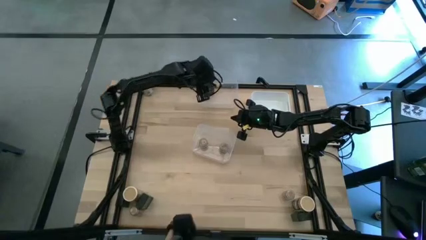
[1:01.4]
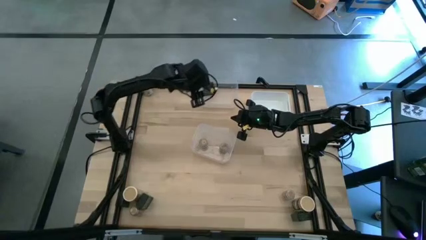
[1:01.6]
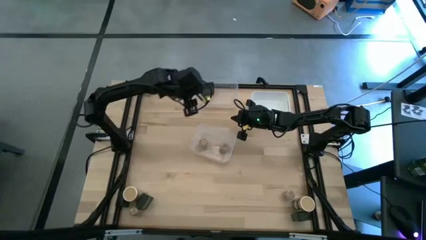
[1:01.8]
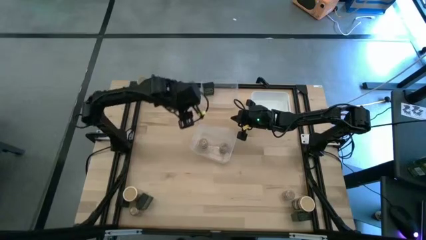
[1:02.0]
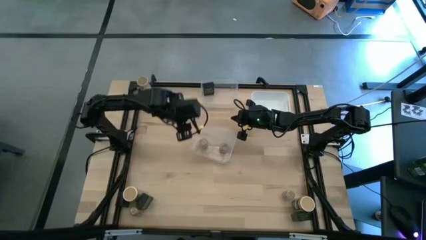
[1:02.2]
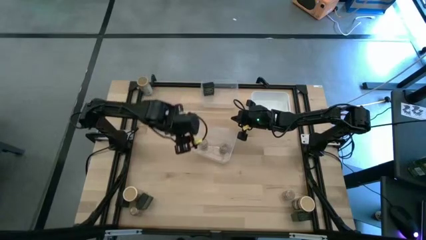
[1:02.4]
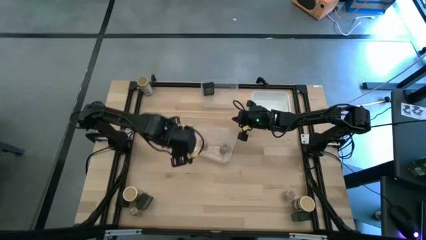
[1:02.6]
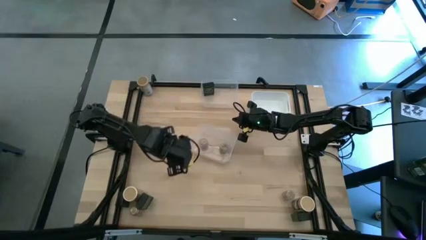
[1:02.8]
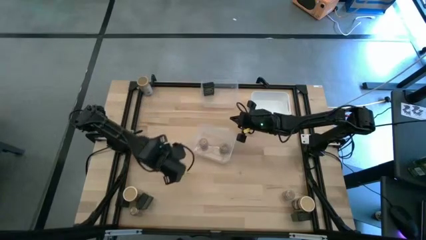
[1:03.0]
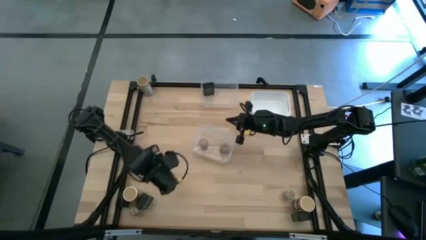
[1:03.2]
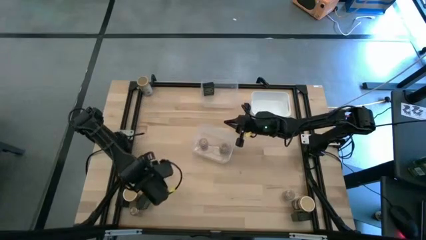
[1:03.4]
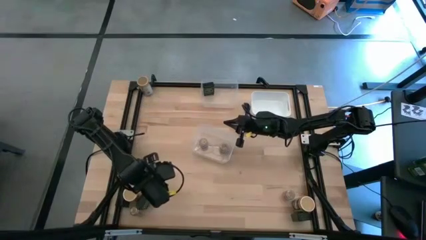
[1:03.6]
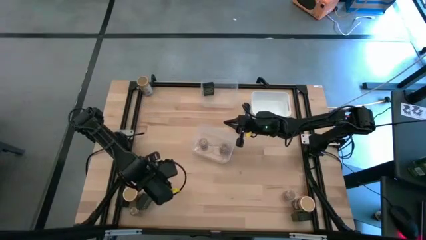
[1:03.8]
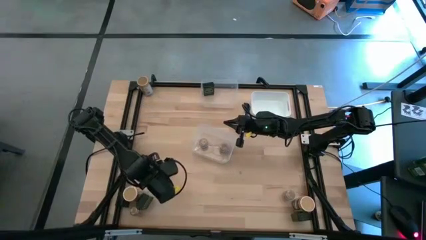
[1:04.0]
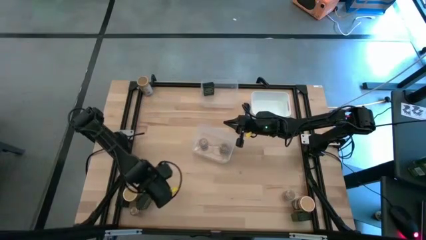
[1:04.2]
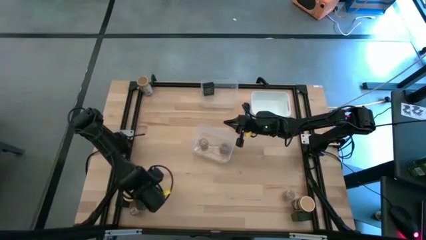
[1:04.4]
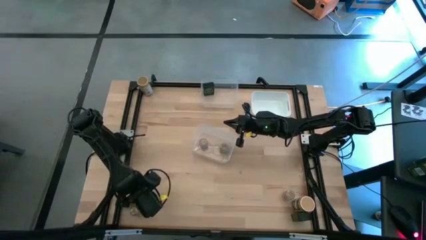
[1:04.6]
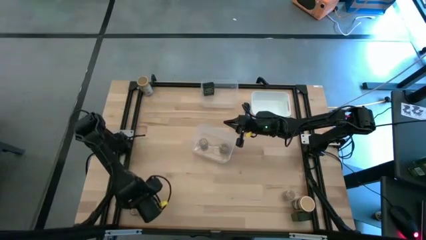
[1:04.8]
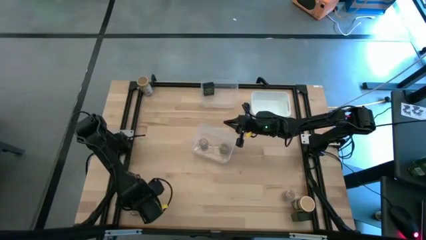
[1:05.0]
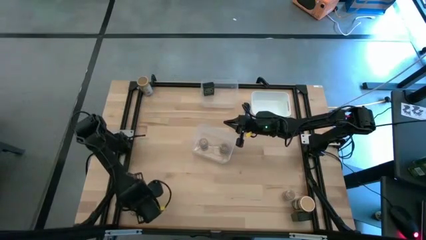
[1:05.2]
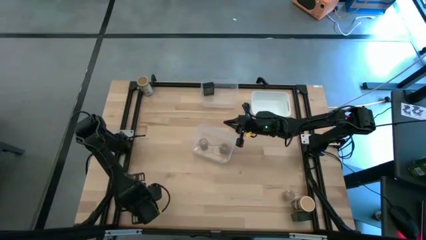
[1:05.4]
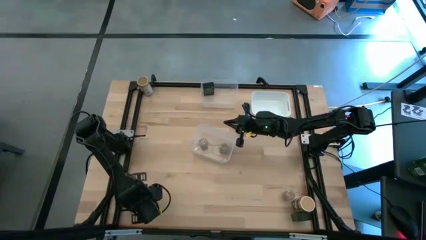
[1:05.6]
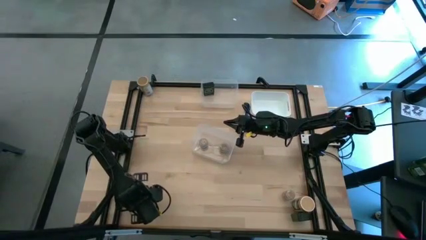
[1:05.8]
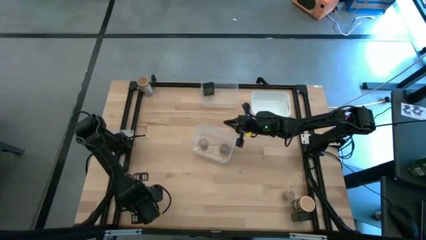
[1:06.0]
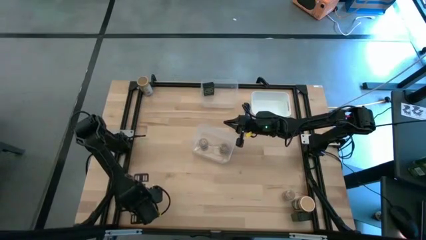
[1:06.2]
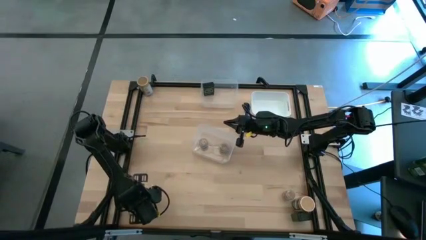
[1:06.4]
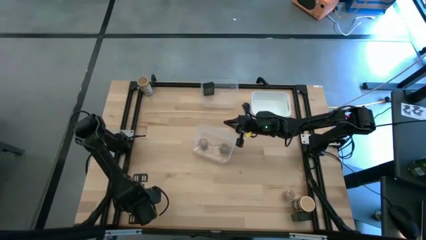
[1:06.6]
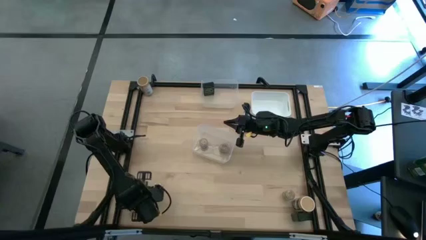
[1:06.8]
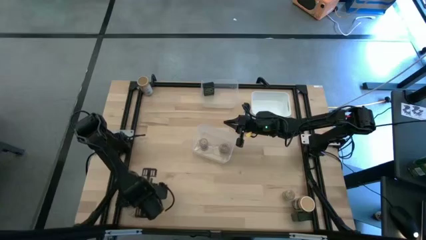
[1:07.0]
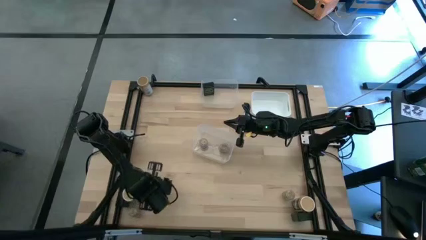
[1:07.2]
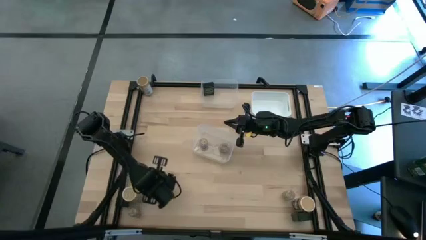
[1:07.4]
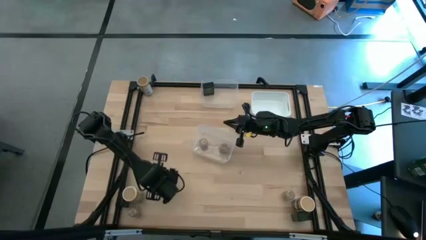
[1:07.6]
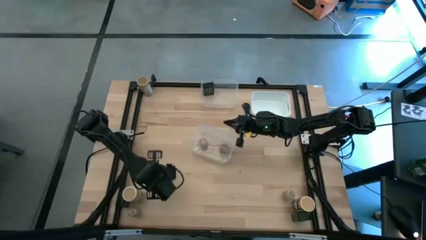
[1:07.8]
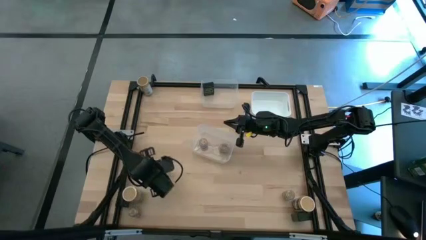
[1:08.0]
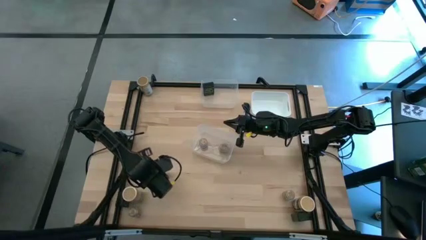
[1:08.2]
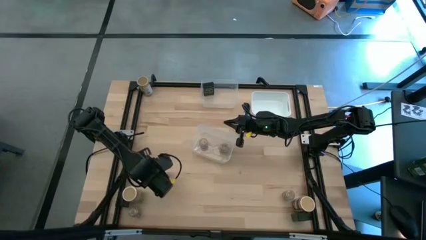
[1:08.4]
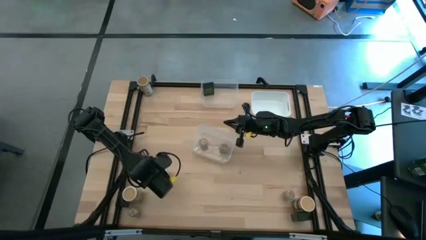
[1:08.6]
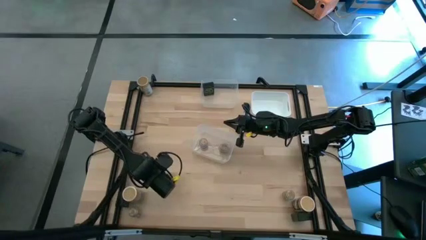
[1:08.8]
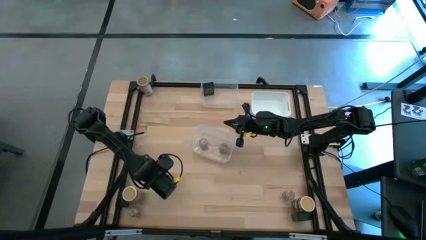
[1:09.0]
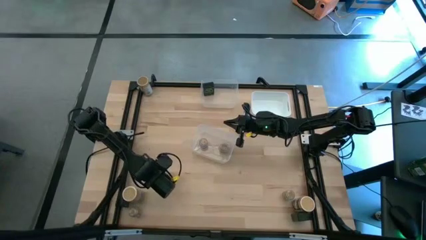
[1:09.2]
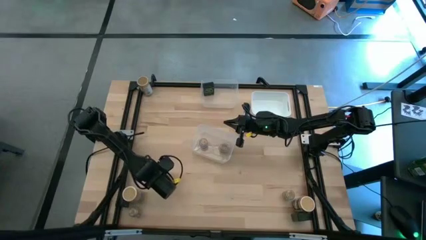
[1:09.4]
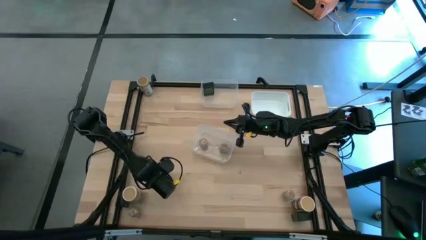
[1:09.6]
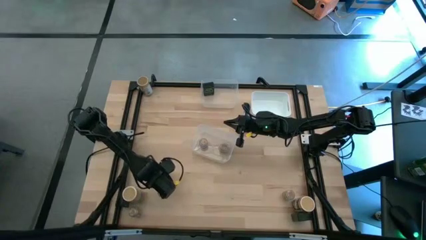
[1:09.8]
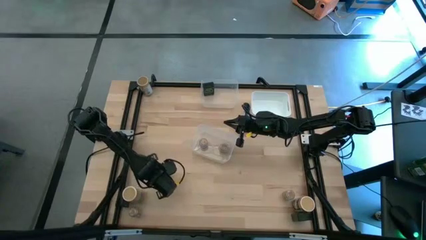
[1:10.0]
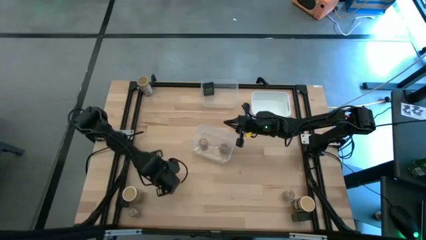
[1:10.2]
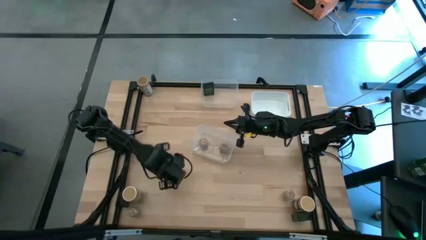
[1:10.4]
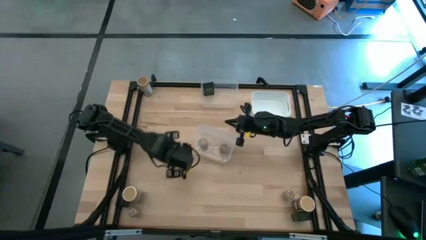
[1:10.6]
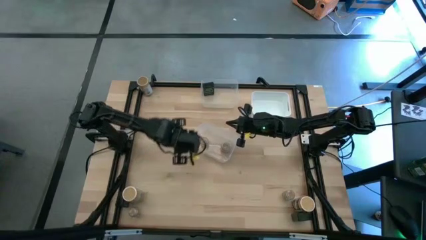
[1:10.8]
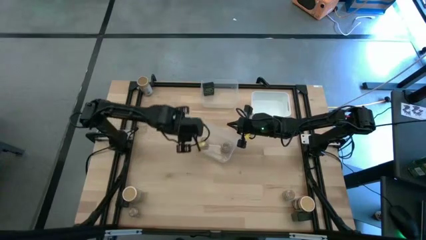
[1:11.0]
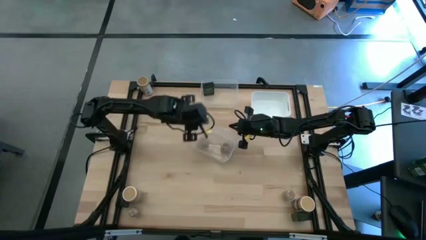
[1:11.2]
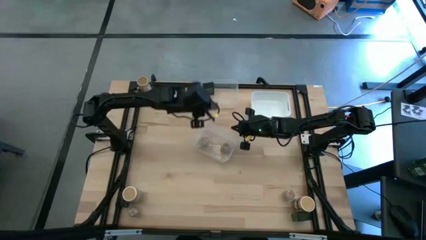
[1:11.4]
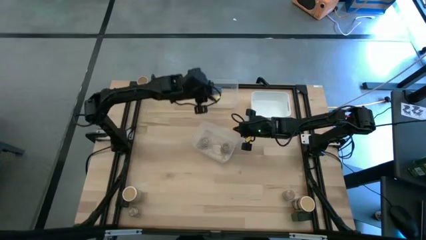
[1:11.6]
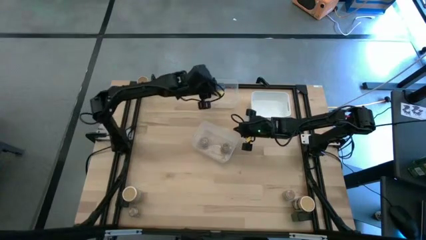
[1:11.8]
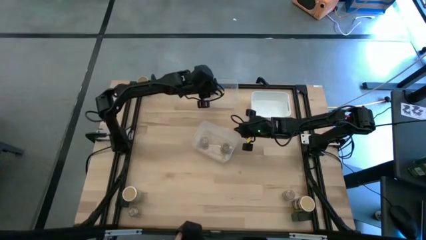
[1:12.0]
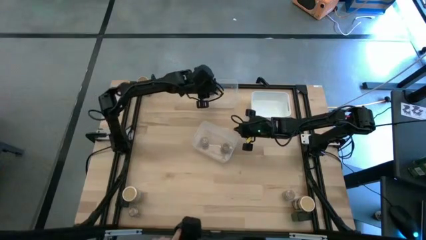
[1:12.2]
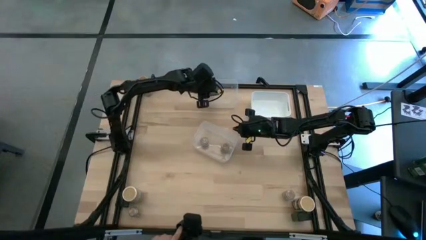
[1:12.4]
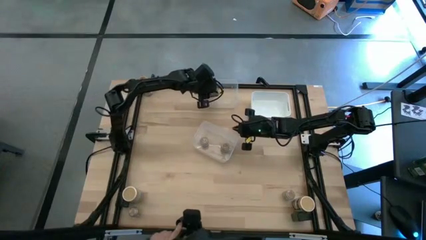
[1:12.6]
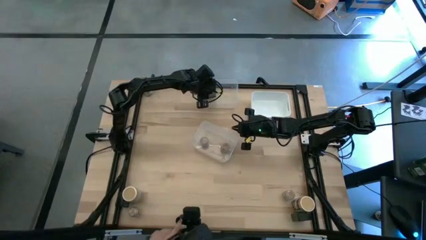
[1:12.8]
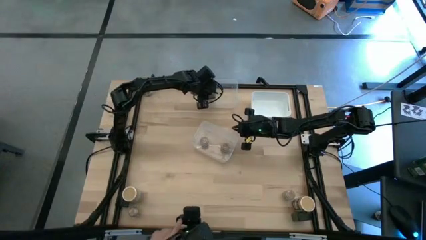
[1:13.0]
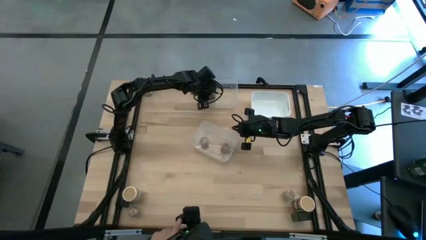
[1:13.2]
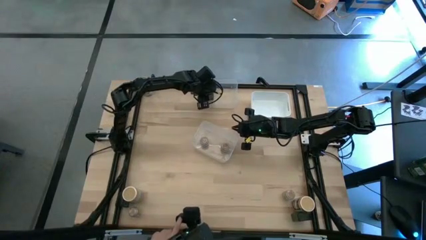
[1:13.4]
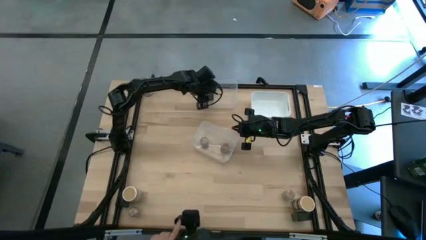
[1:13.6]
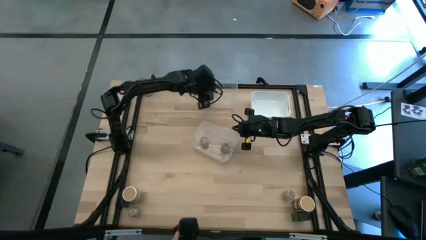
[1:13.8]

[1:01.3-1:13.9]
Task: Sort spices by type
Put the middle black seasoning can into the top transparent bin

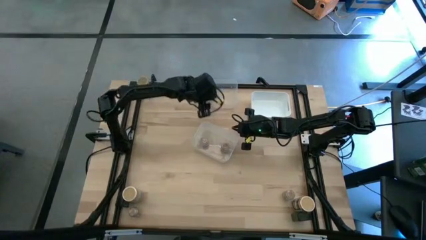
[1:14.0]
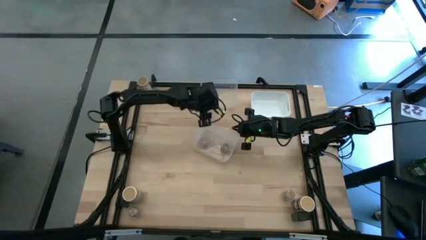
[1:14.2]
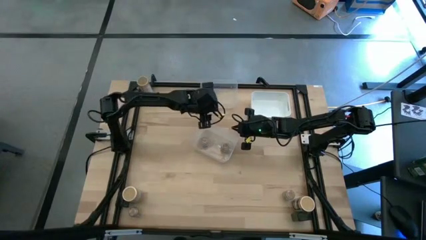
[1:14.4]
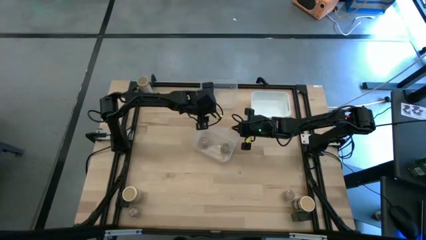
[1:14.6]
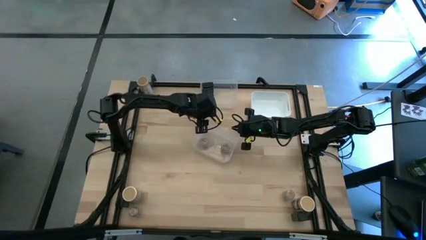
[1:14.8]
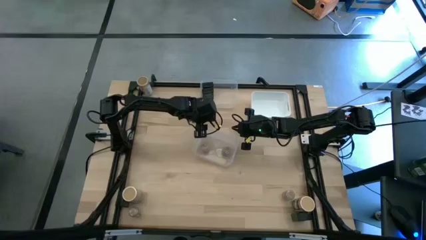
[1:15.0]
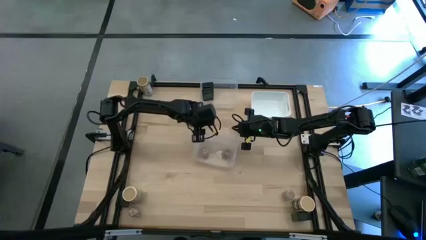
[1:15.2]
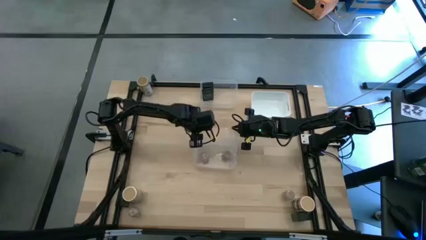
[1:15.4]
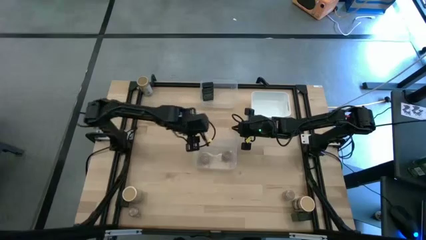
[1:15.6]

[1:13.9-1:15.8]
Adjust the bottom transparent bin

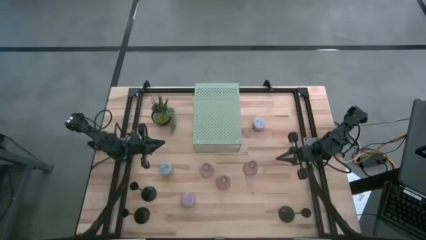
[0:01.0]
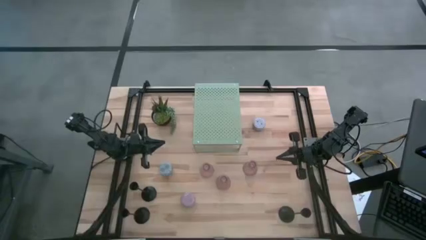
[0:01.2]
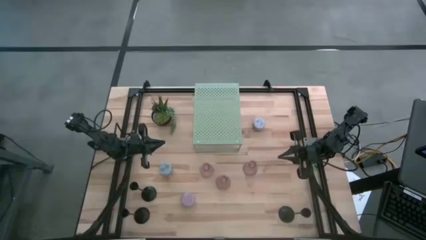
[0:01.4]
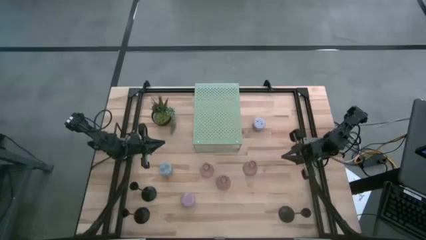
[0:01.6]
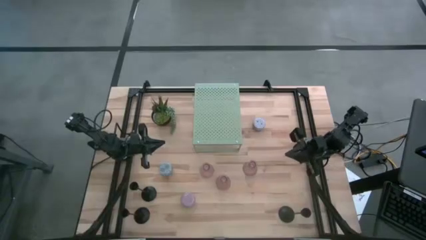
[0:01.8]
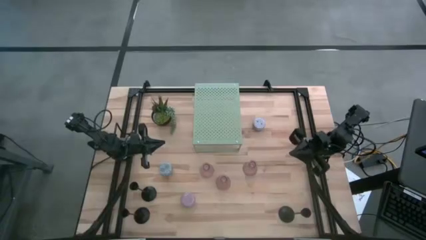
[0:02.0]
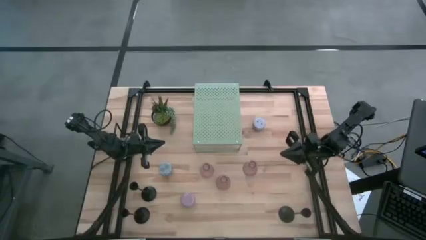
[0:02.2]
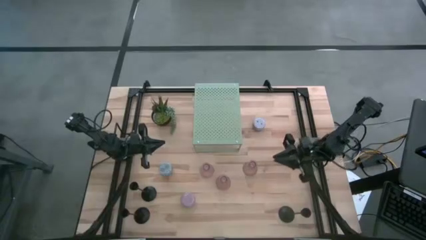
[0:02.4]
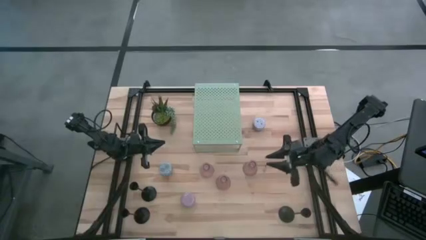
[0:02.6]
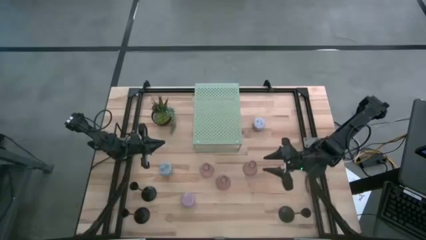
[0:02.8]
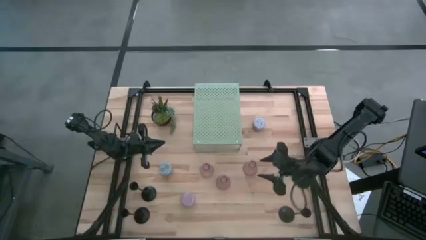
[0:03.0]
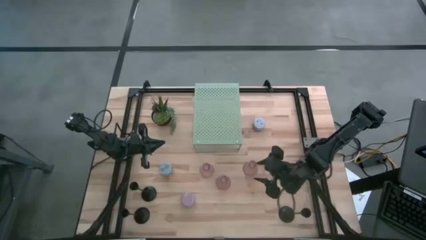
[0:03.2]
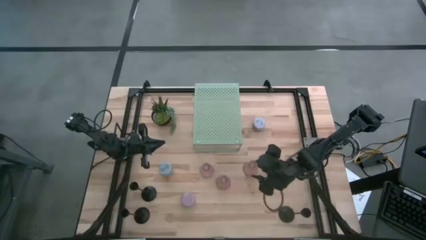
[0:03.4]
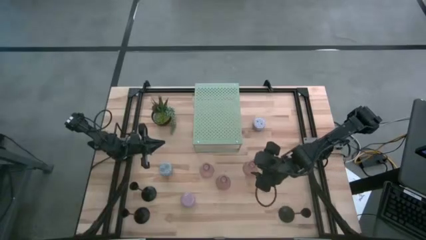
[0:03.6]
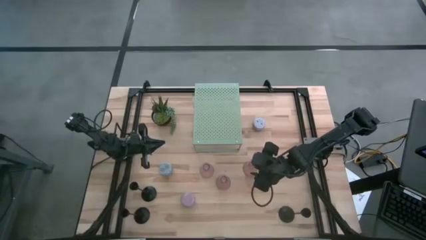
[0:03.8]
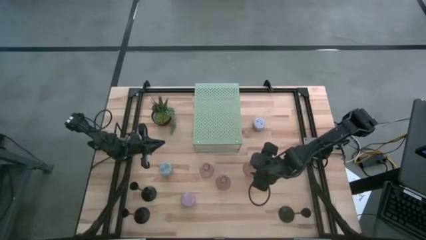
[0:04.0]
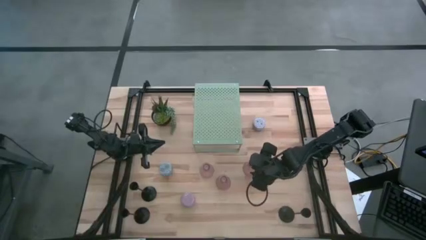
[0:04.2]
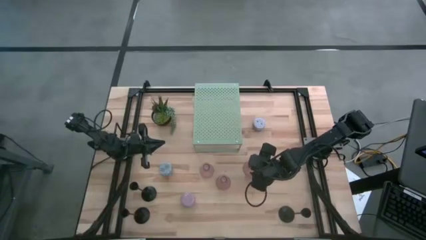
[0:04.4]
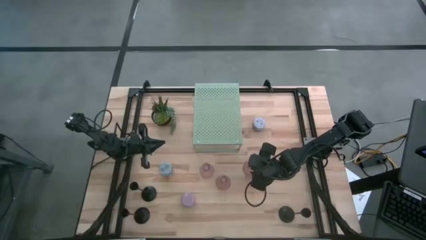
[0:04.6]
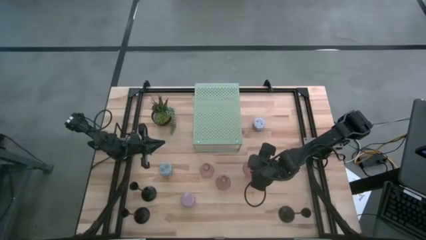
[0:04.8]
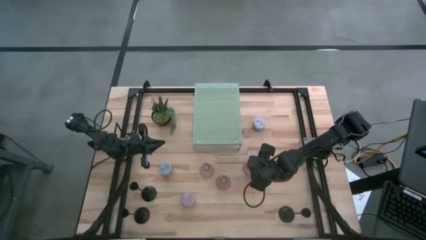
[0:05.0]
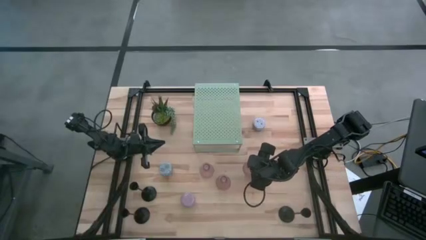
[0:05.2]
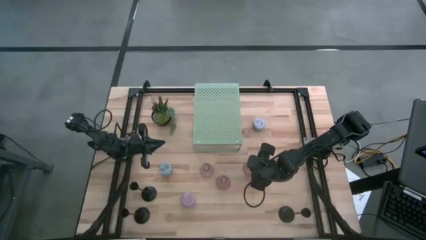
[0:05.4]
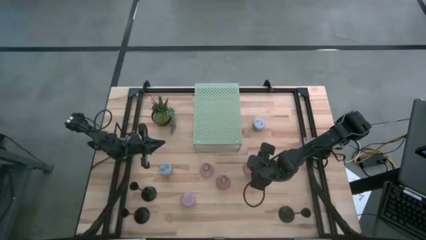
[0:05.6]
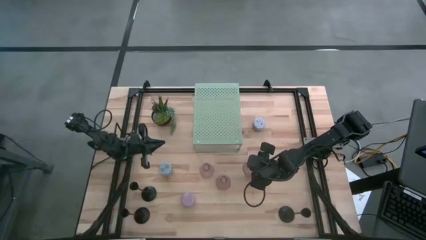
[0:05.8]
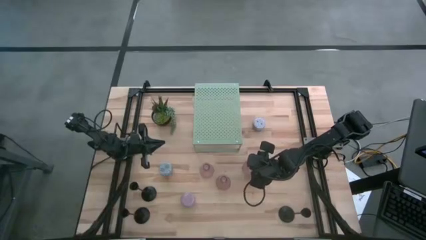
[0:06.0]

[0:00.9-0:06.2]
Task: Pick & Place candle stick holders
Put the top right pink glass candle holder on the shelf
